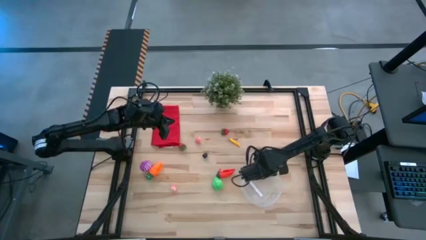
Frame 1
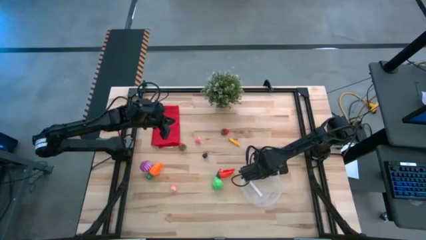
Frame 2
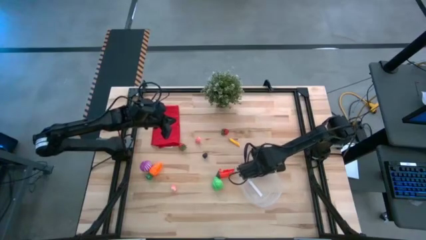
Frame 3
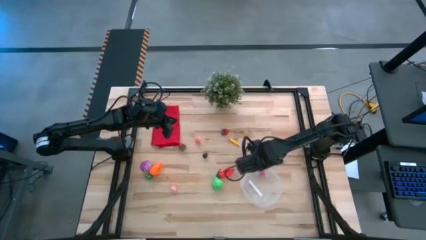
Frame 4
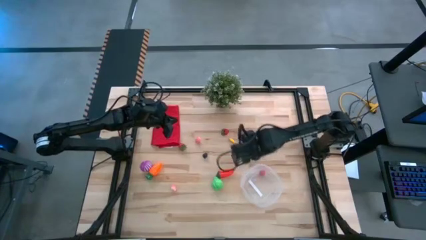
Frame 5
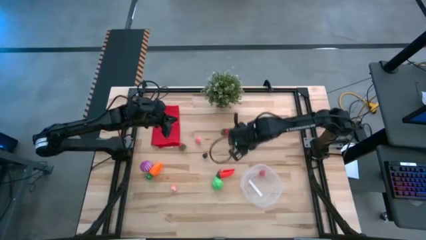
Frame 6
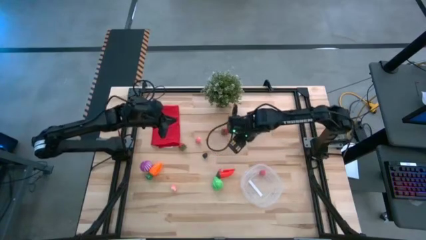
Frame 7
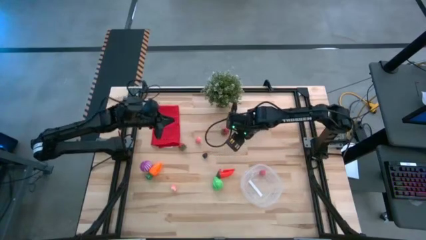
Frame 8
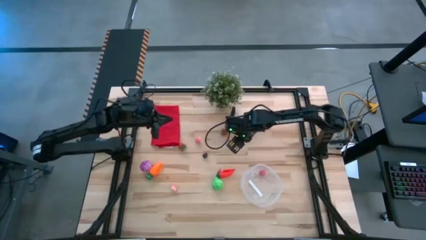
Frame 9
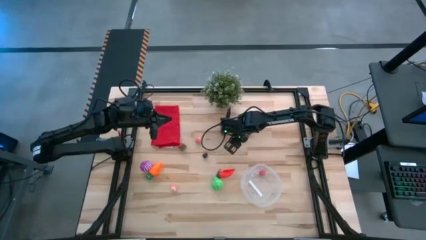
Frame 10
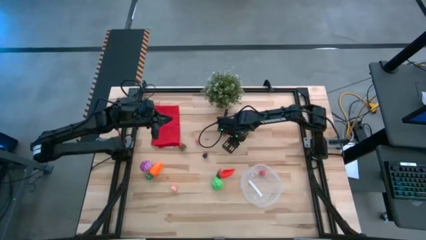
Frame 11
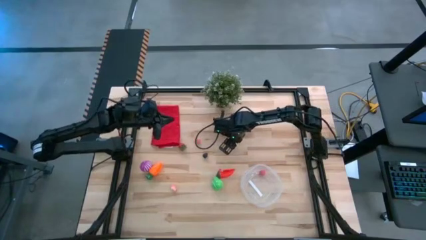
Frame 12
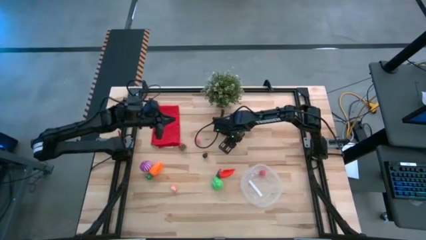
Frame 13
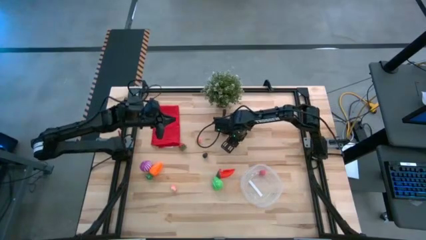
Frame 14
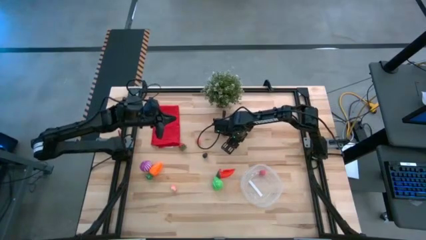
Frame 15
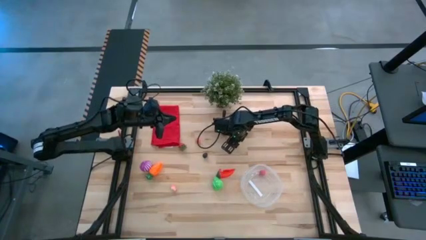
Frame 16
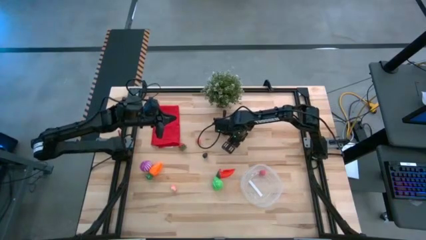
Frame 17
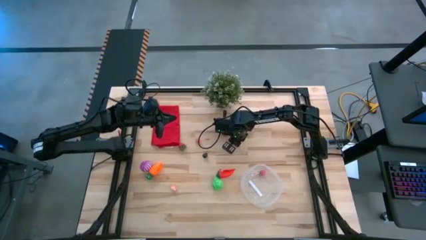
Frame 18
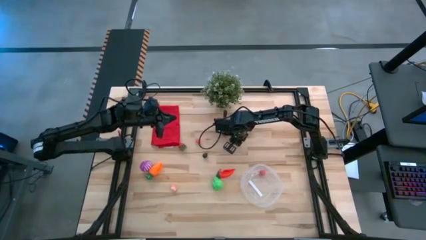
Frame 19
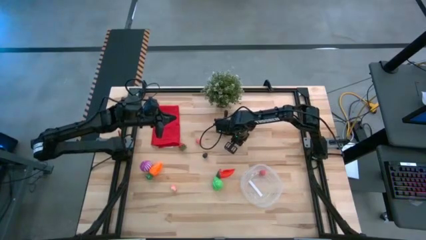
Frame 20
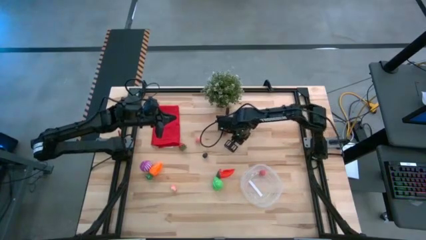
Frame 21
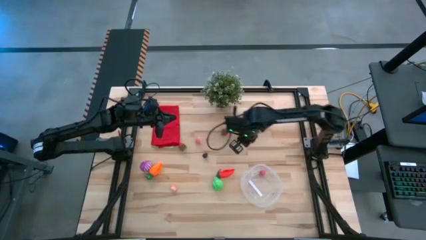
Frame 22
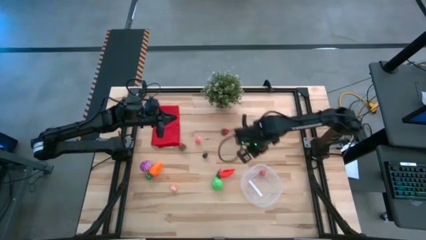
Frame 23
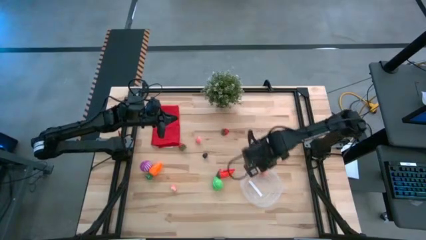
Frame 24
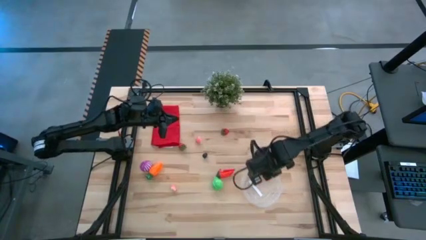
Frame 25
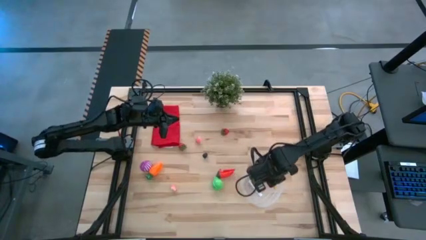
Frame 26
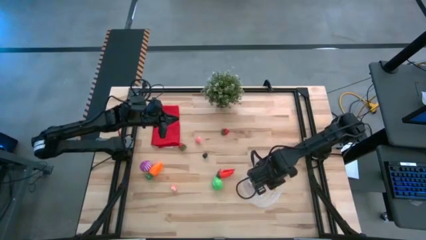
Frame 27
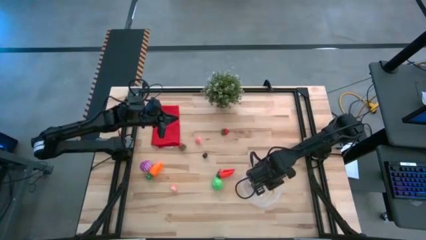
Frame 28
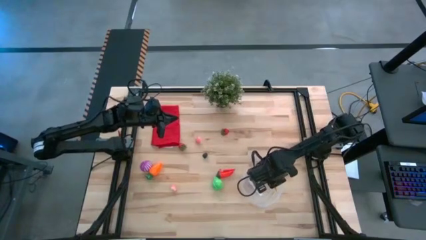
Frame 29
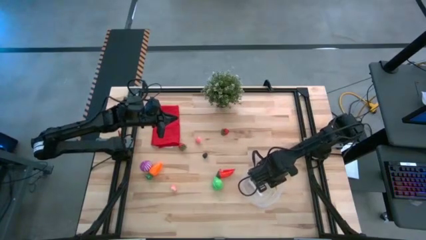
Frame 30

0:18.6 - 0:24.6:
Task: Pick and placing Produce into tupperware
Put the yellow corn into the transparent bin

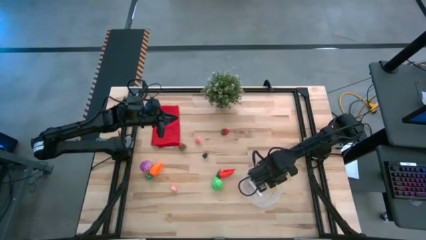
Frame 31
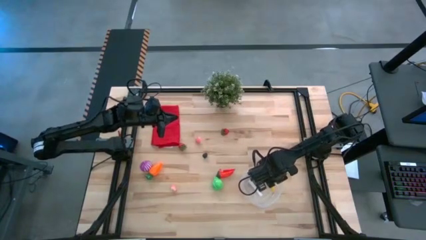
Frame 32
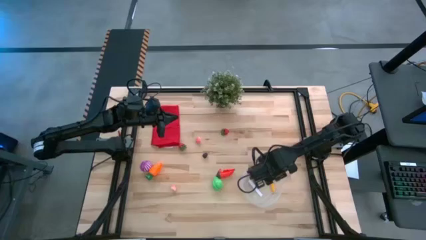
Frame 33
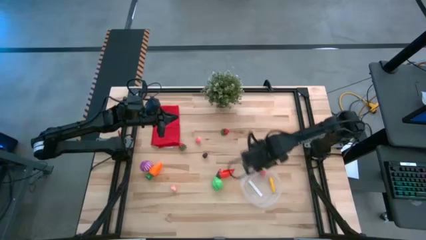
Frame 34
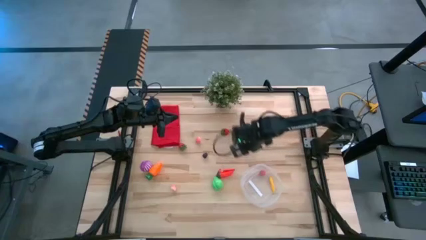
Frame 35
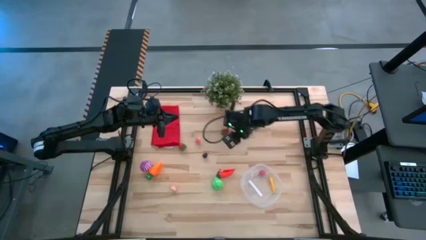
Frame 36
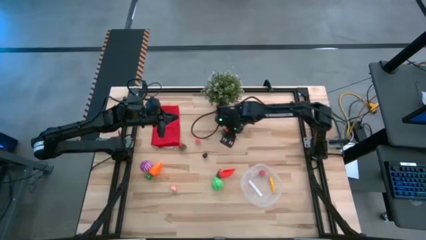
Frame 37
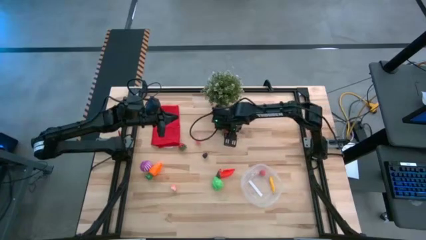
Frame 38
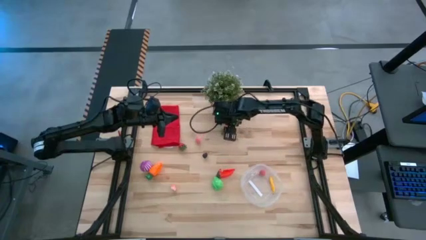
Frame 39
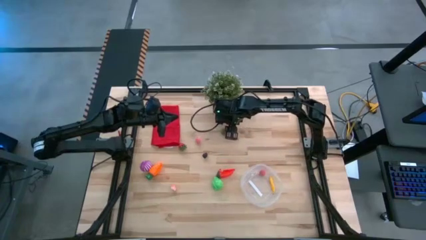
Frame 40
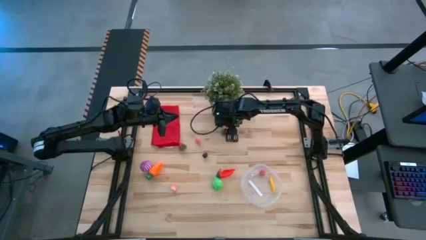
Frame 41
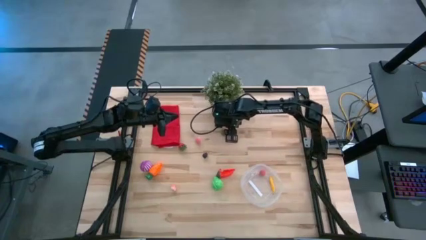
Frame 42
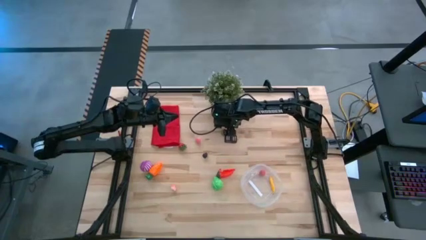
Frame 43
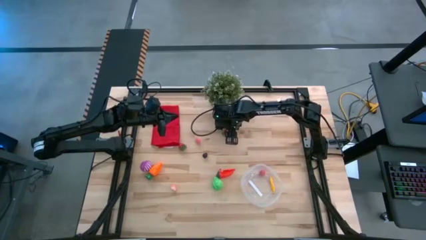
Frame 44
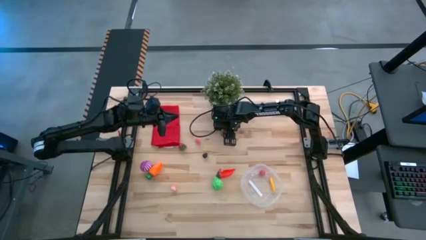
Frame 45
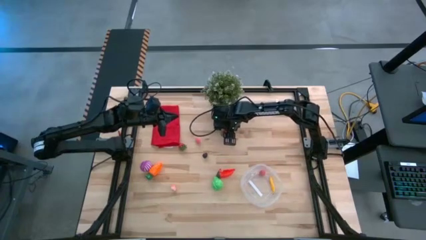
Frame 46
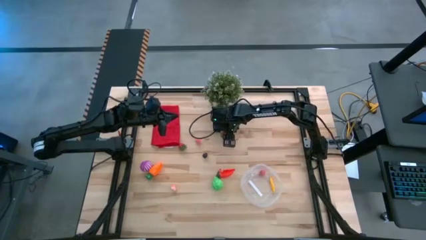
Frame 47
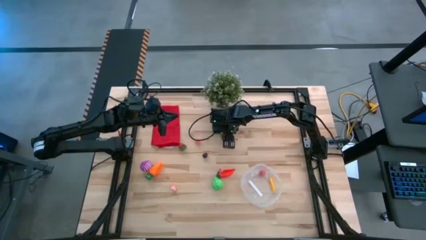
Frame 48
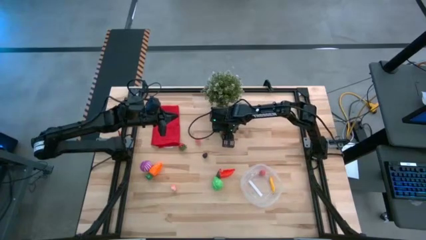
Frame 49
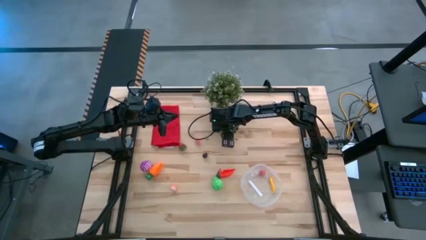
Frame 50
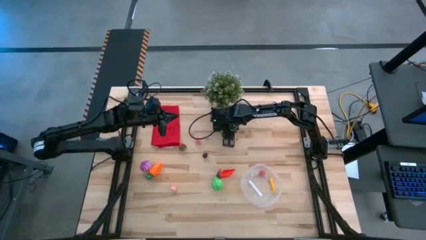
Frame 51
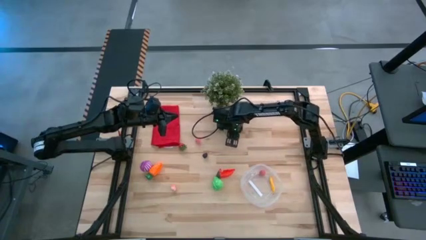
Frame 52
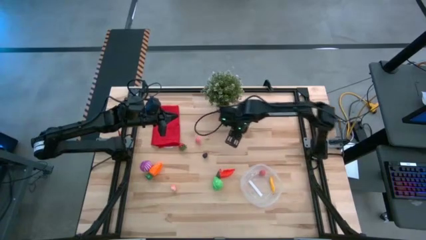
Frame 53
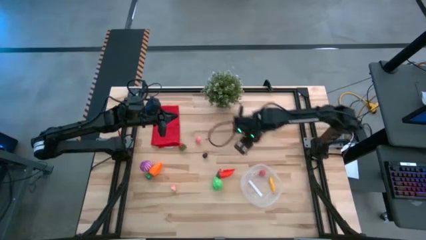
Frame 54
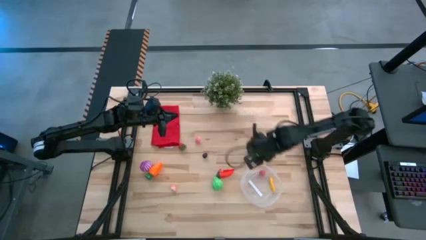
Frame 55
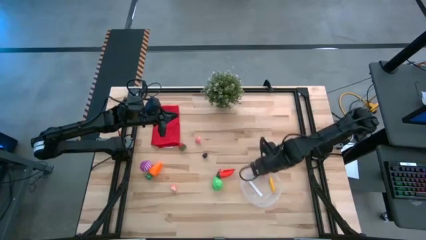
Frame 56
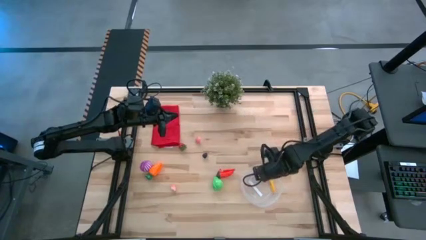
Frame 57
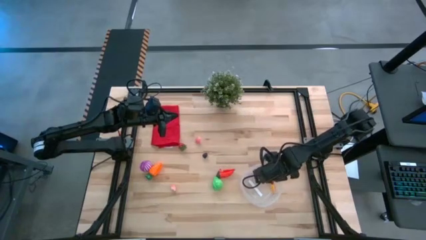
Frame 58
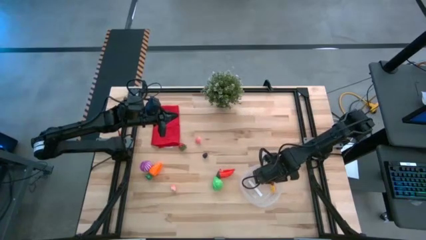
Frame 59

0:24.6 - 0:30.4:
Put the top red strawberry into the transparent bin

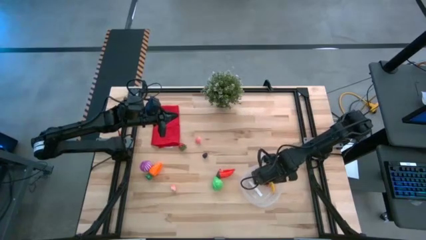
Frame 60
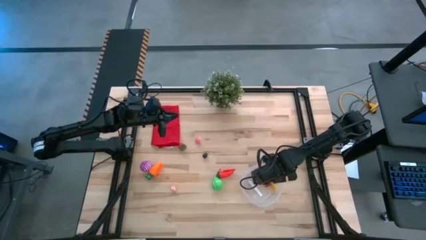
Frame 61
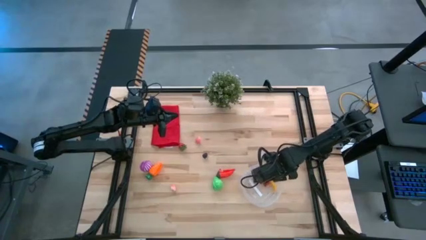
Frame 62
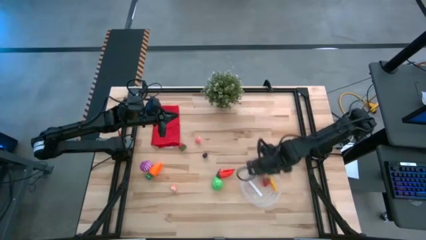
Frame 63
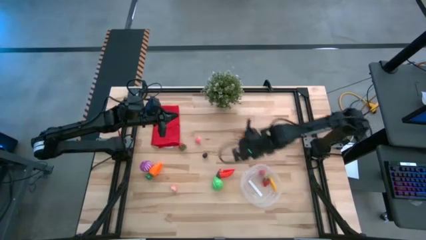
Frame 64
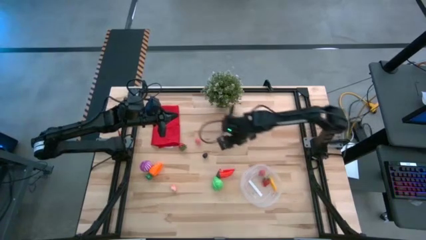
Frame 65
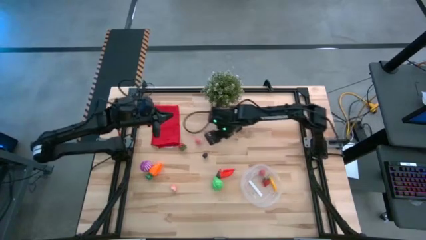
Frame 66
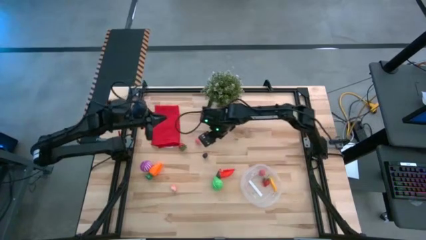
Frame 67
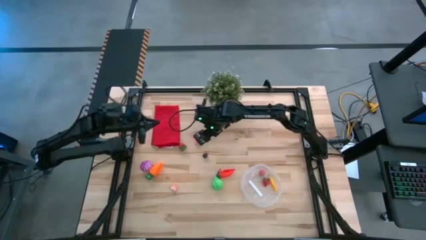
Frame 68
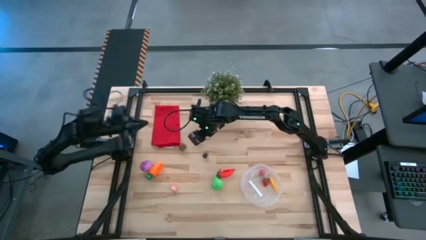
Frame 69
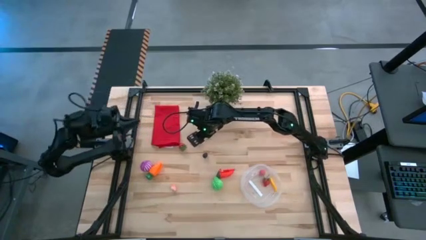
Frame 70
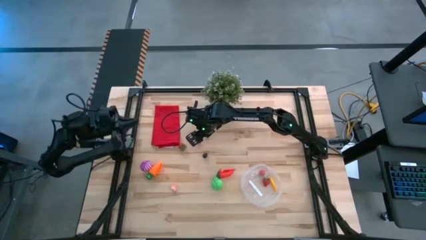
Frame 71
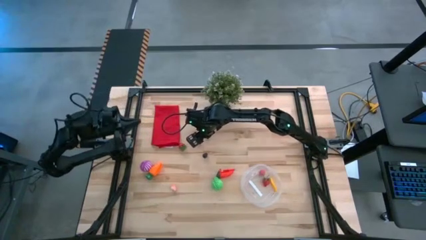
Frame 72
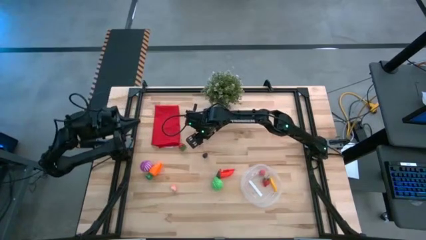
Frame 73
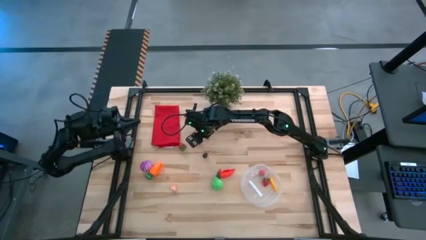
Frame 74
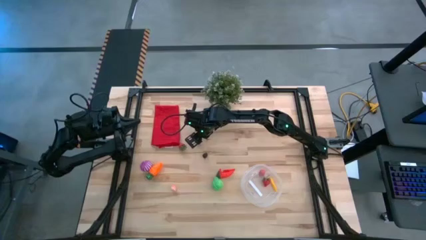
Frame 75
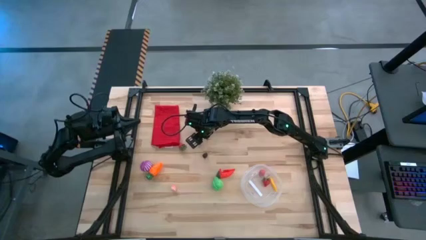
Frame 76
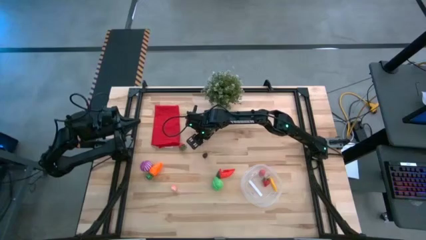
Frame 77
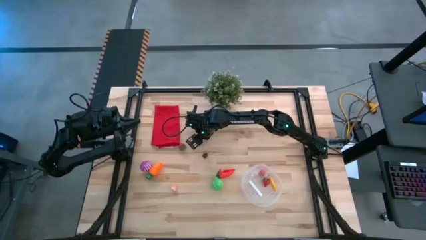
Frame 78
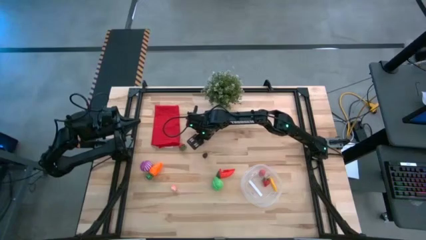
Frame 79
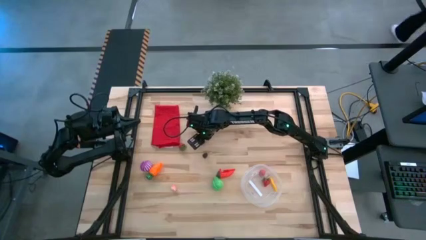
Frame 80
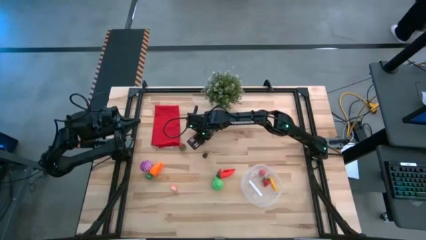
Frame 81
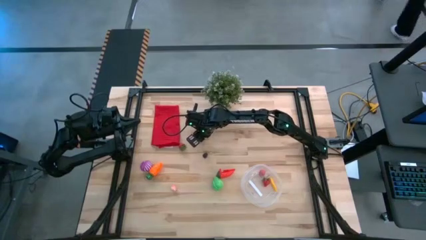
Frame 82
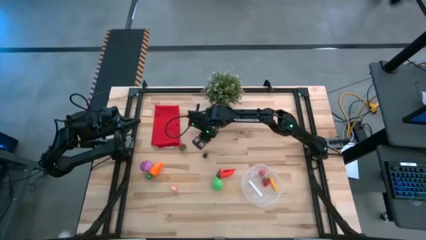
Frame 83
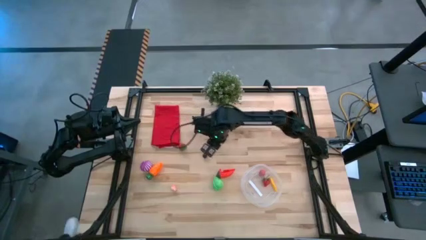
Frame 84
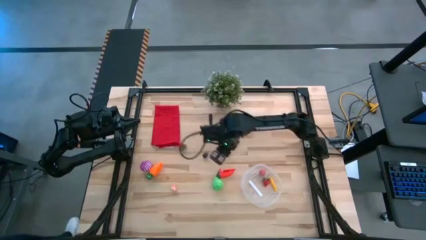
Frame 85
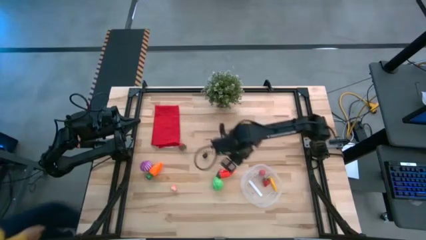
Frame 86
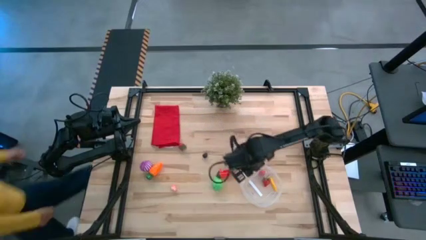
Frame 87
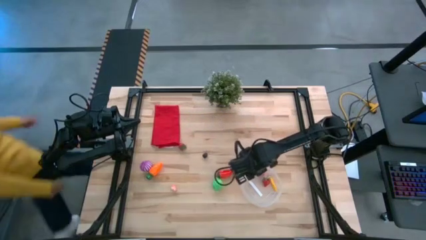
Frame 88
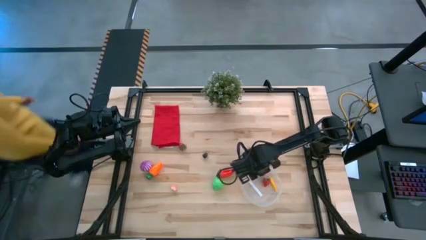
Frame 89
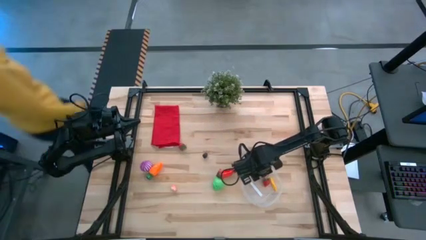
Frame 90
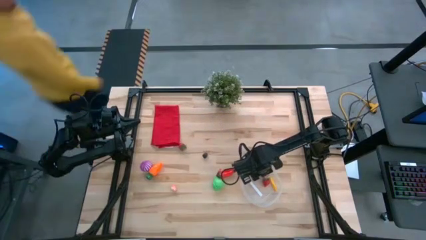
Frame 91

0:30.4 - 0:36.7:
Put the top pink peach into the transparent bin
